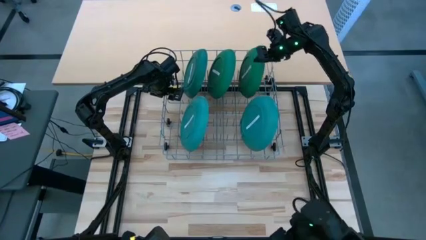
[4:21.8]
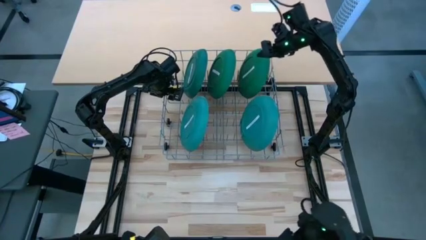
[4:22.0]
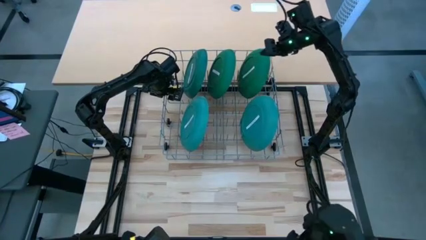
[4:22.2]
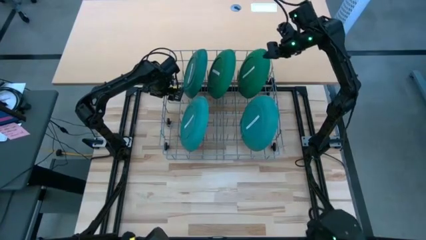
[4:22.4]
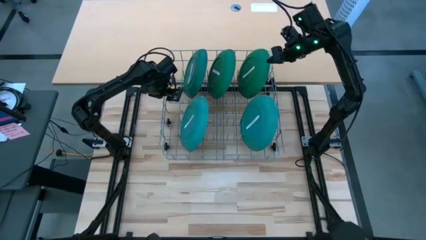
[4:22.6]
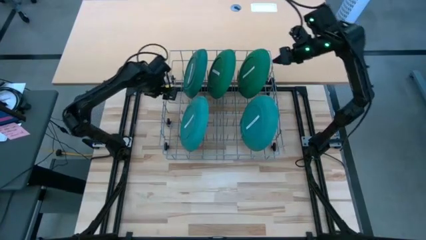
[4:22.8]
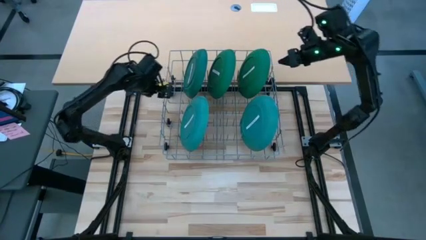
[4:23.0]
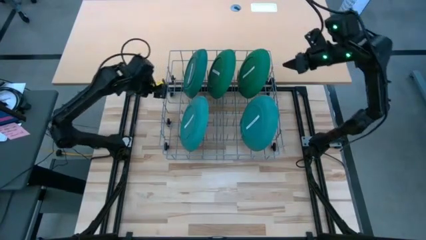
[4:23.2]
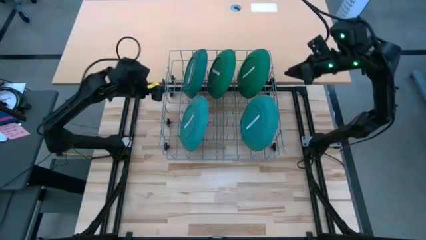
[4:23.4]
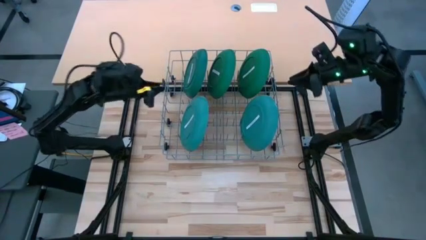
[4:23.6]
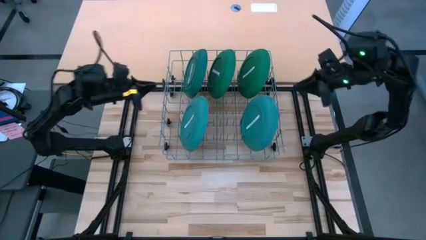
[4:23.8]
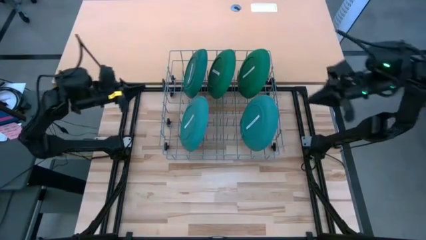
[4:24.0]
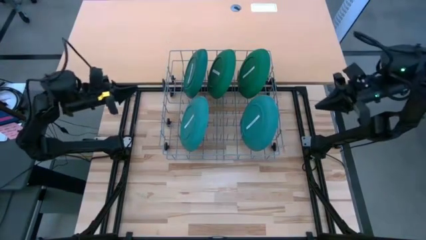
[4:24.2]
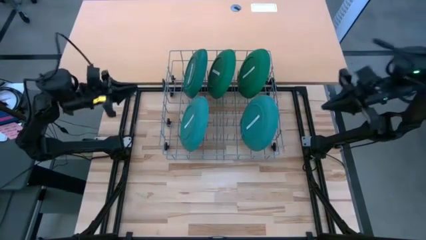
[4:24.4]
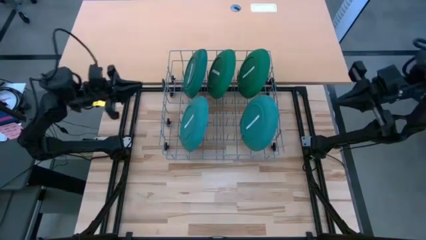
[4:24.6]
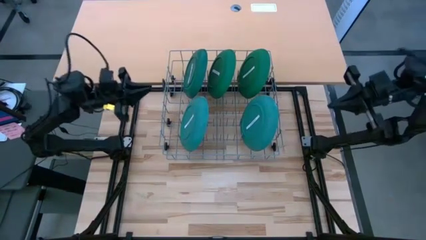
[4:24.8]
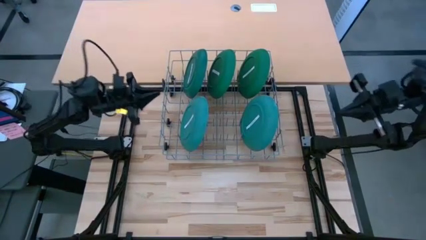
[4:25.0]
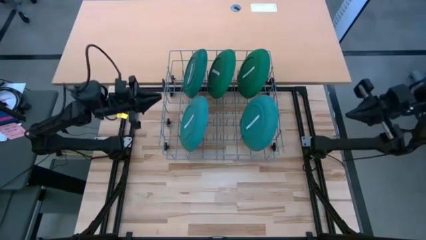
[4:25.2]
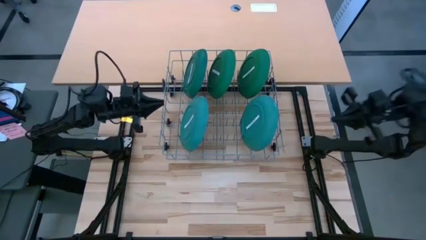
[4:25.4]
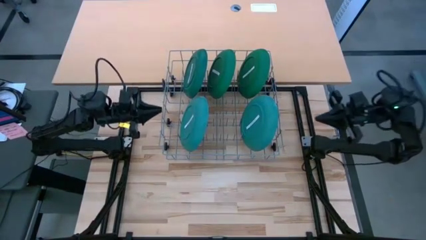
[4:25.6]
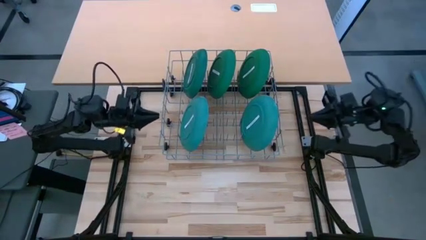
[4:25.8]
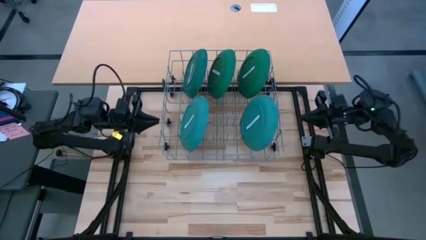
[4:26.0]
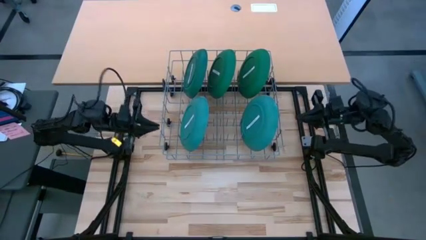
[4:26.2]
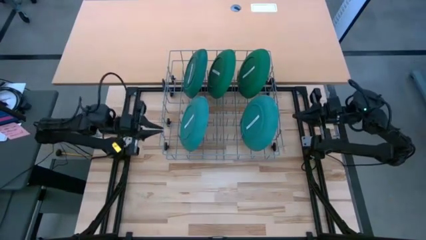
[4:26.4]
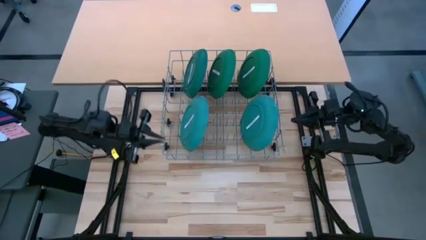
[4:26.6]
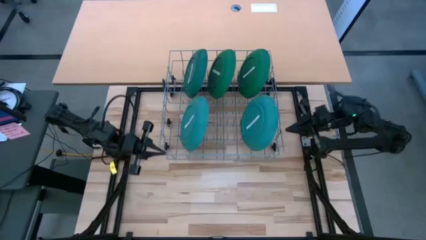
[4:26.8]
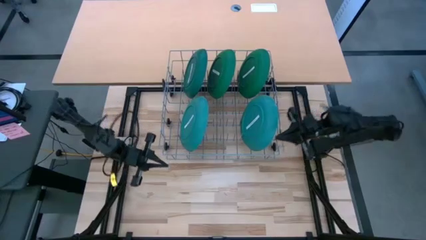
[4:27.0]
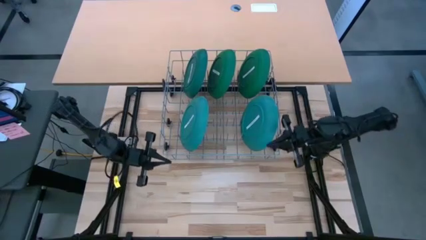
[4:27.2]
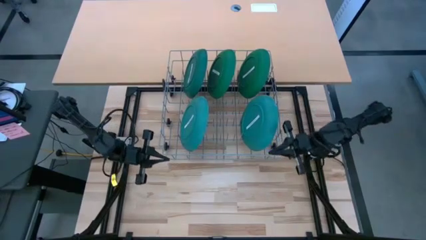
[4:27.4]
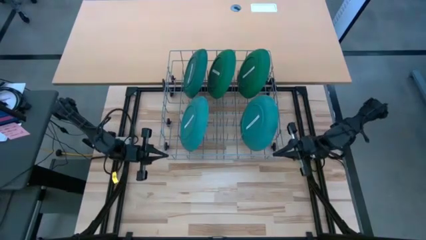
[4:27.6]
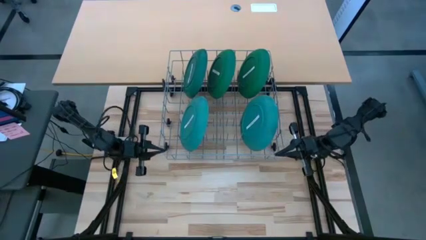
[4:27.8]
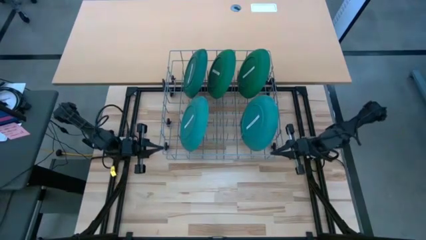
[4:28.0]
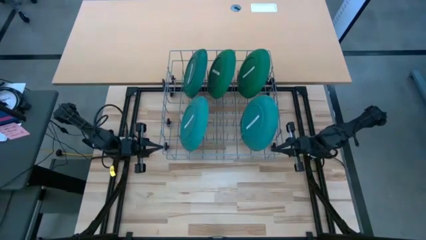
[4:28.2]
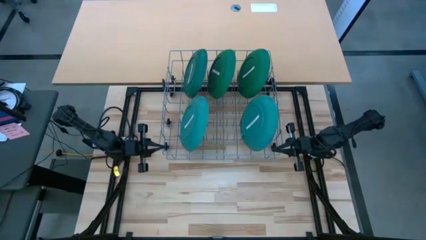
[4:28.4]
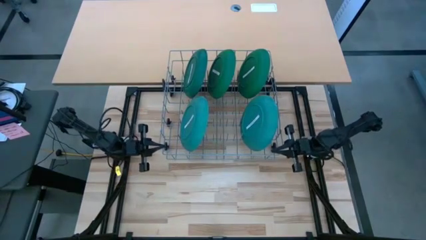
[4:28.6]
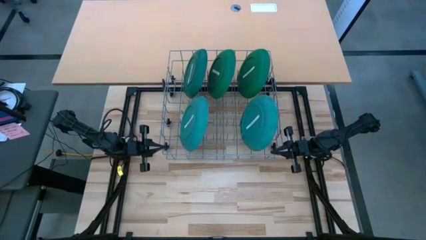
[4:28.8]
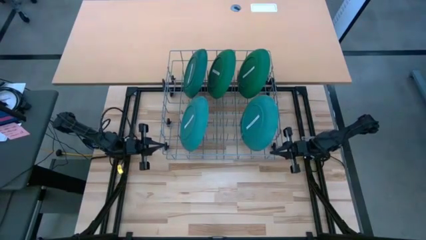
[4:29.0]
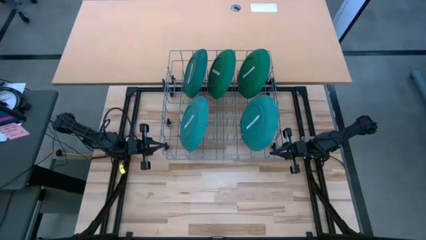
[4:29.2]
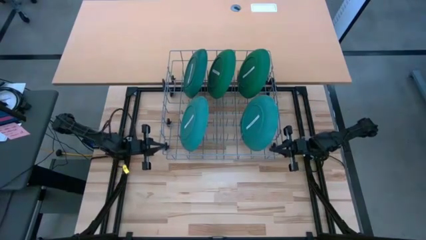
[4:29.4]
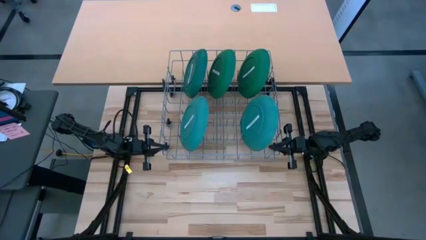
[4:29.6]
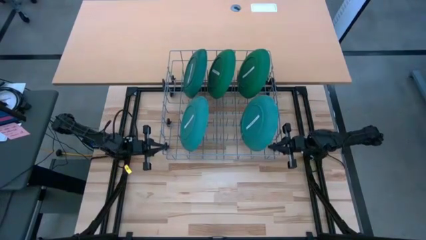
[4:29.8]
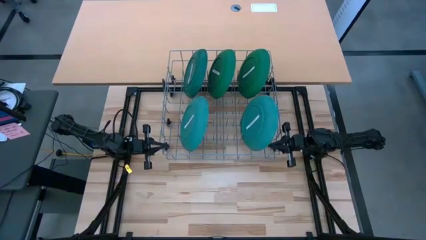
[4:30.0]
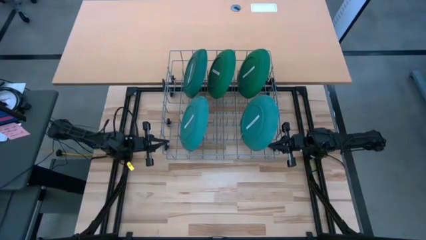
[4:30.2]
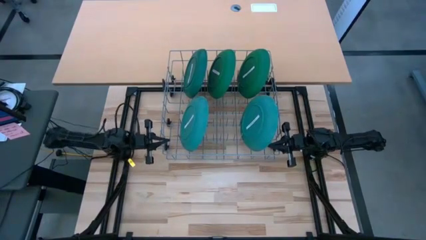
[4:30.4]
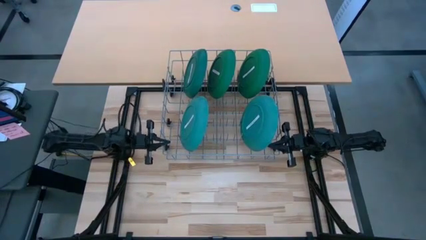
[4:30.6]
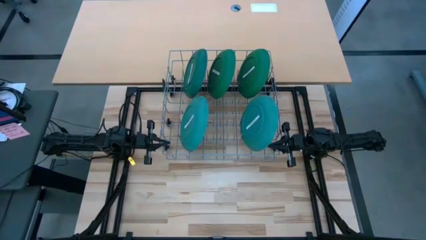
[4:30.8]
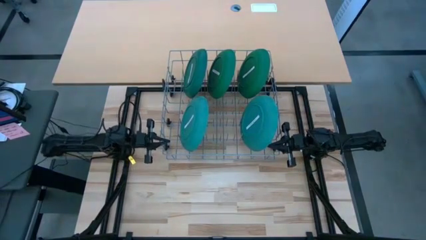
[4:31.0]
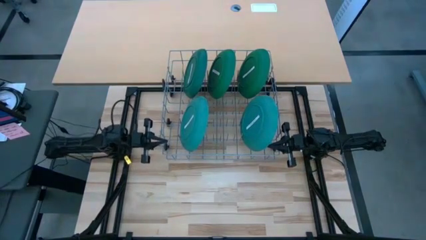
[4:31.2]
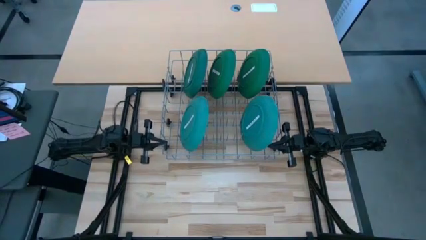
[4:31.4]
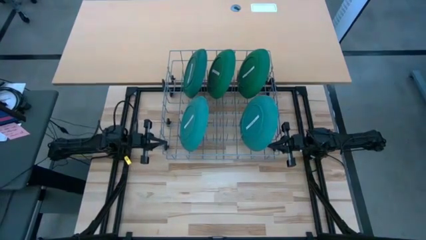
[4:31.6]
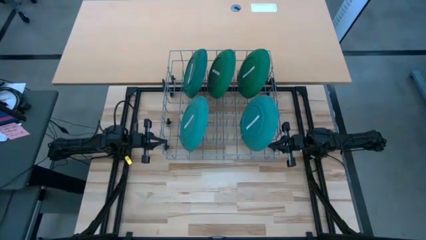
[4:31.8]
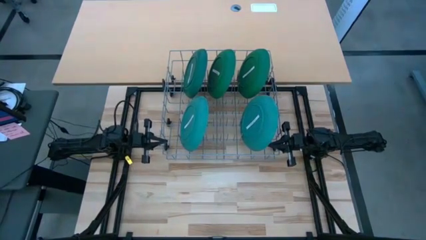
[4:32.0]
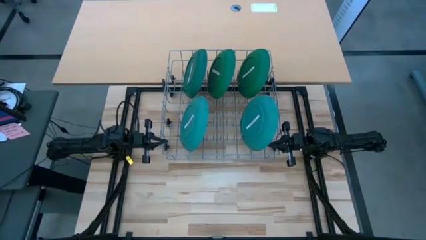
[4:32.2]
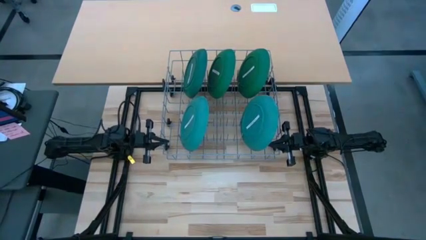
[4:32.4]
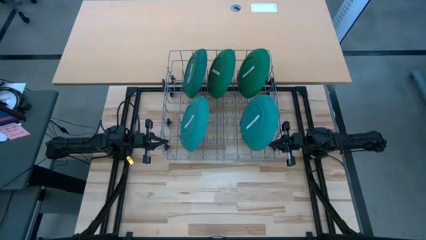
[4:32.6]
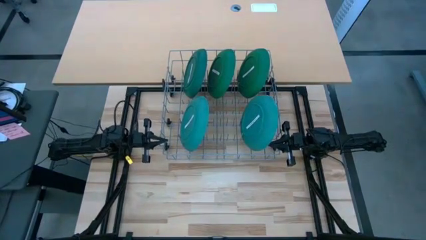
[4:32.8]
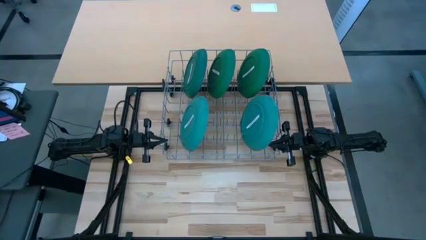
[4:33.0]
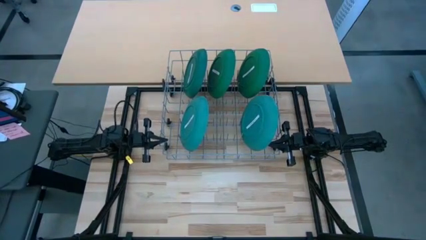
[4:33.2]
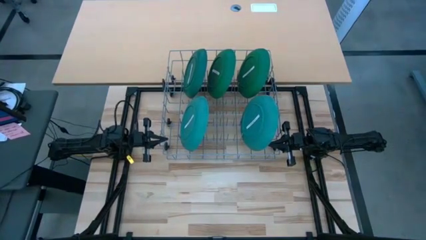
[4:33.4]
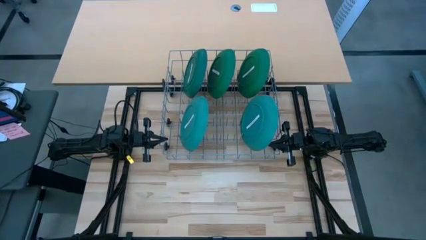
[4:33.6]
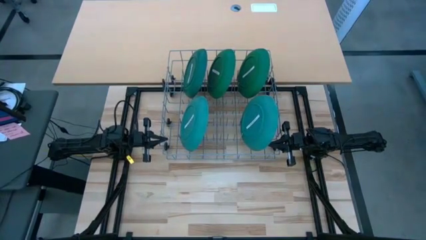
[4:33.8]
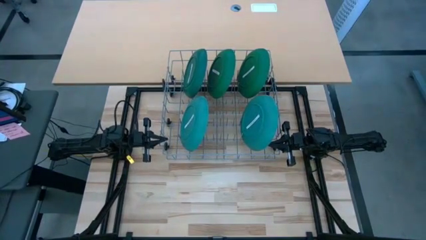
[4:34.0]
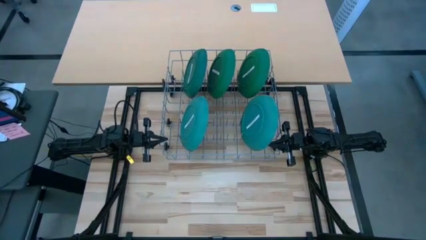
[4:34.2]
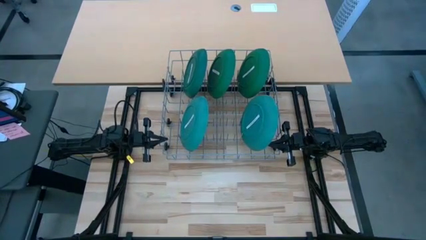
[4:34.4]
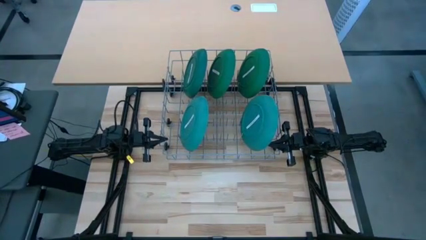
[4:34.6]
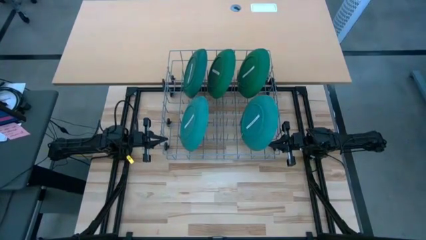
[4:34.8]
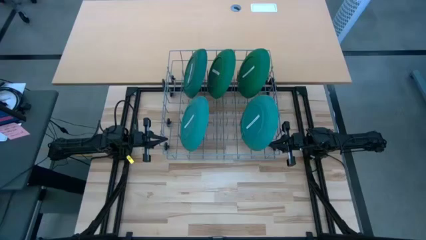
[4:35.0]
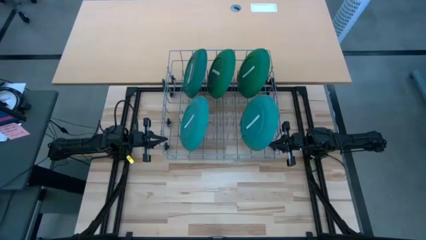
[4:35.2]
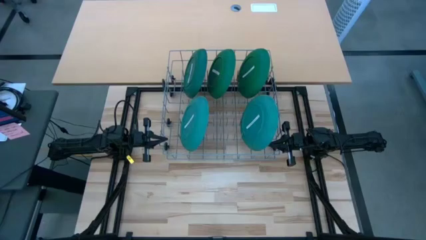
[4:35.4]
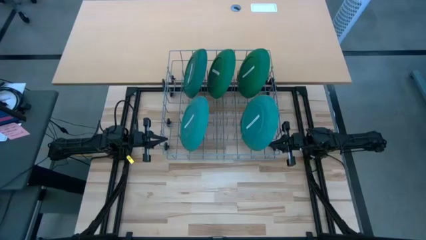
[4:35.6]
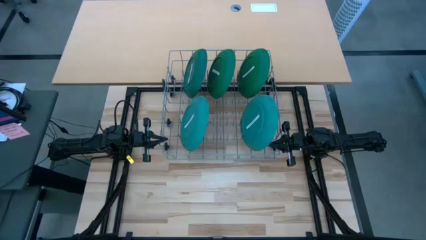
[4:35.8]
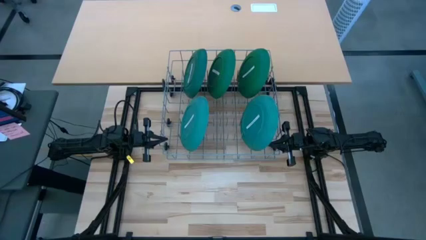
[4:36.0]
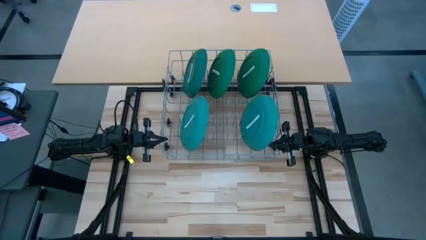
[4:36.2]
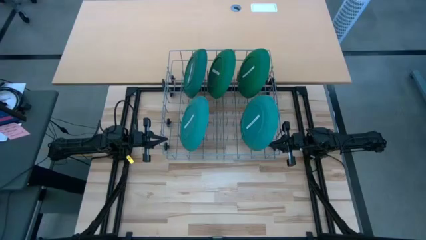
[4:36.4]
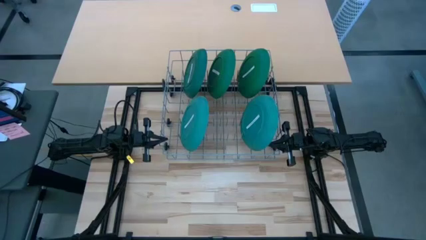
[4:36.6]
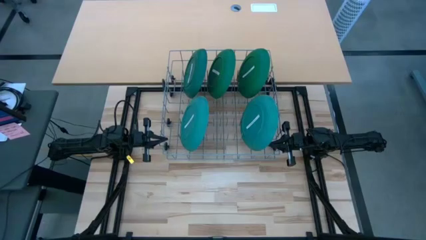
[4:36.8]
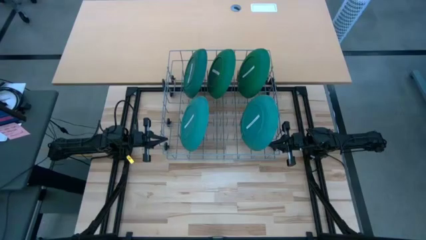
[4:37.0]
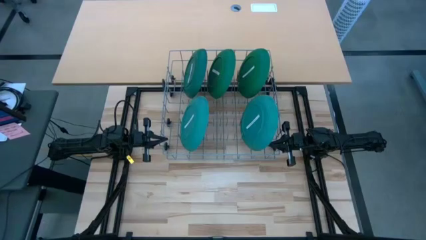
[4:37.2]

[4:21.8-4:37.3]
Task: Sort dishes
Return to Home Position

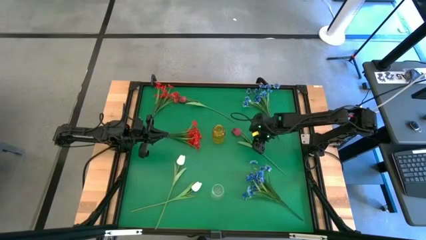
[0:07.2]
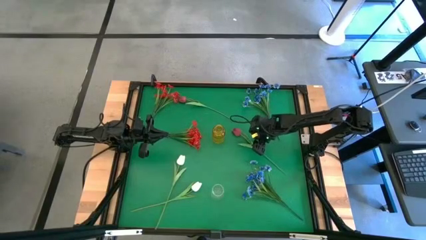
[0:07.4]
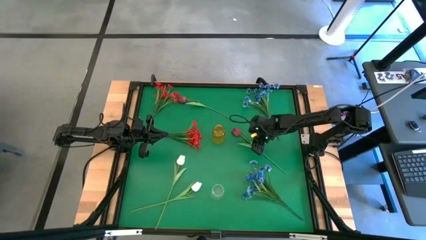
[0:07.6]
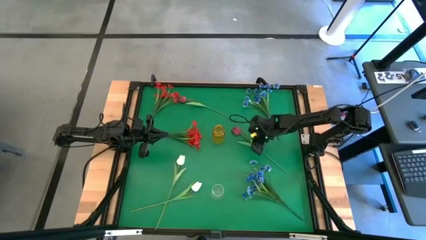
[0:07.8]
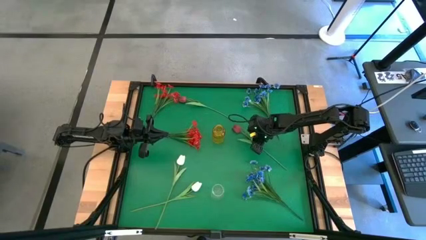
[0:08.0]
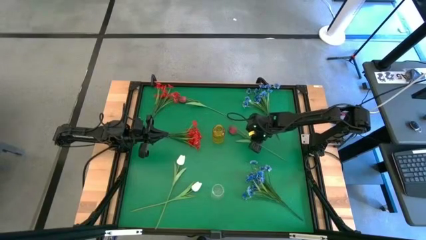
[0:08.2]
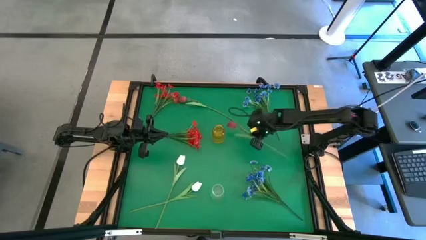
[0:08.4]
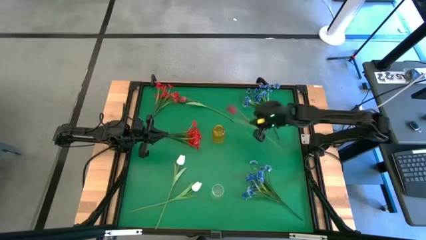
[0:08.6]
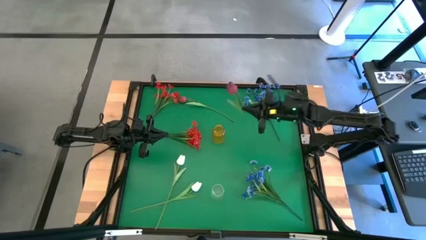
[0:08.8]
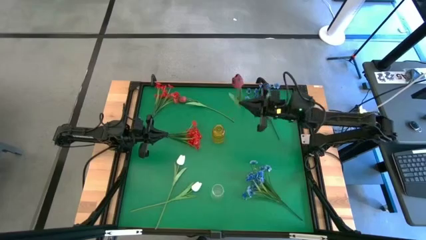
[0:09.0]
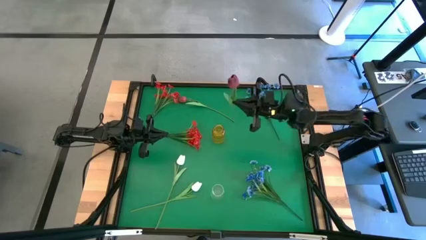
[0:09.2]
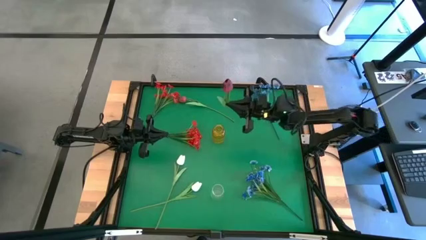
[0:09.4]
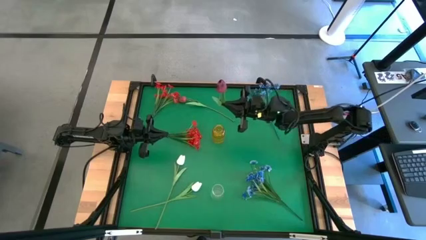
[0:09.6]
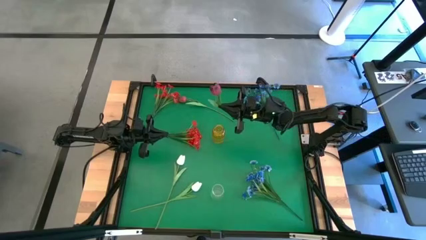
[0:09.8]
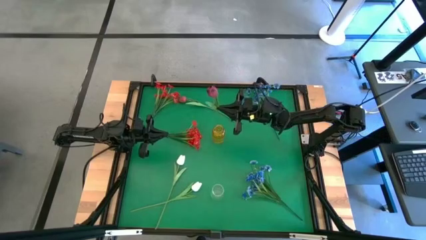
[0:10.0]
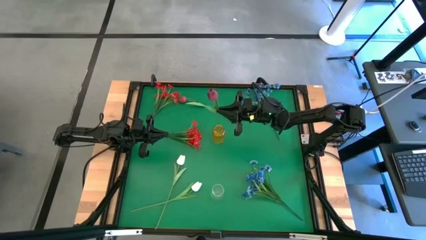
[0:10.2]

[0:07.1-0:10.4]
Task: Sort flowers into vase by color
Put the bottom dark red flower into the yellow vase
